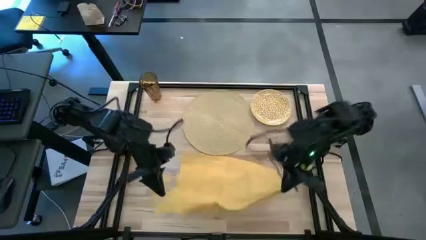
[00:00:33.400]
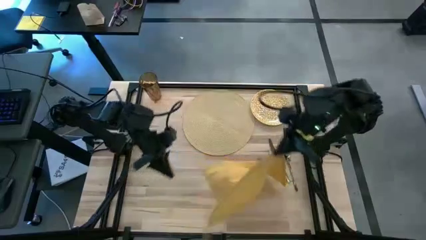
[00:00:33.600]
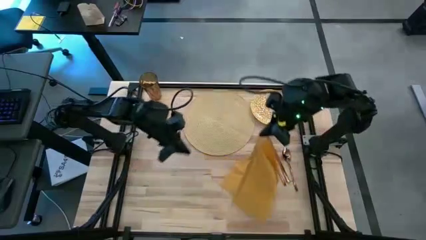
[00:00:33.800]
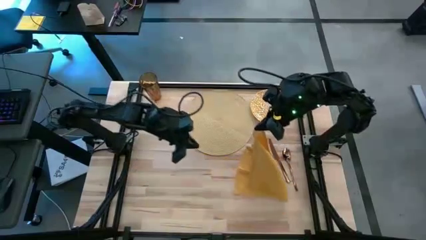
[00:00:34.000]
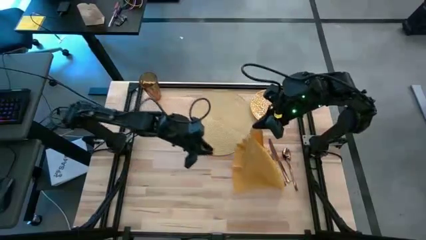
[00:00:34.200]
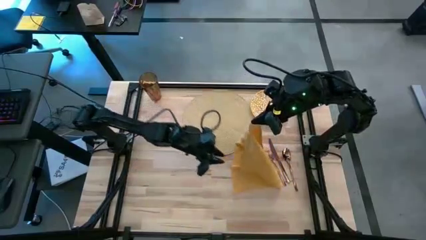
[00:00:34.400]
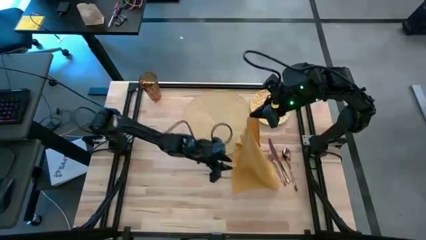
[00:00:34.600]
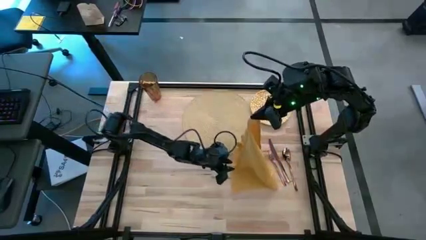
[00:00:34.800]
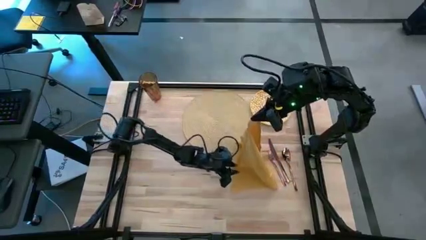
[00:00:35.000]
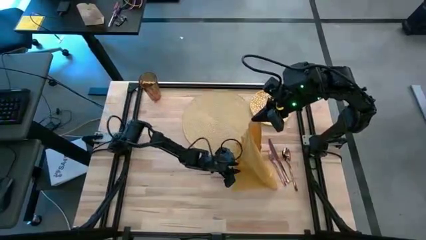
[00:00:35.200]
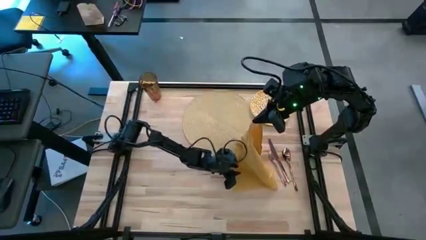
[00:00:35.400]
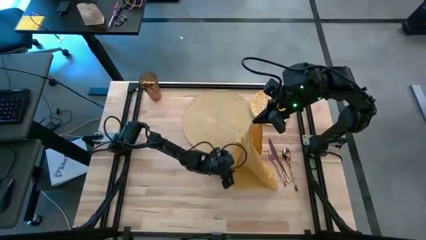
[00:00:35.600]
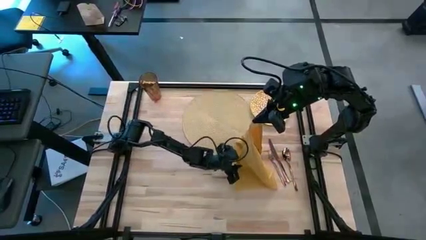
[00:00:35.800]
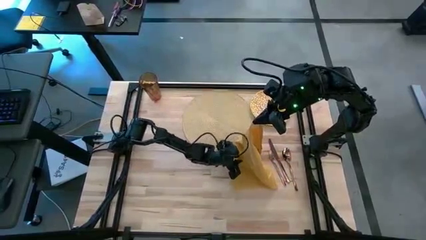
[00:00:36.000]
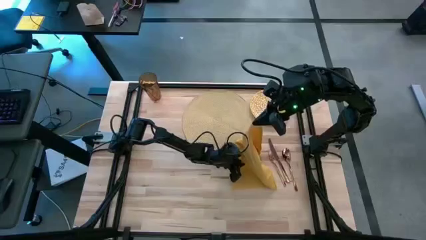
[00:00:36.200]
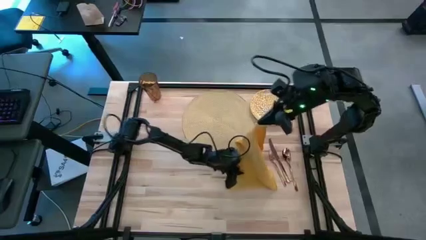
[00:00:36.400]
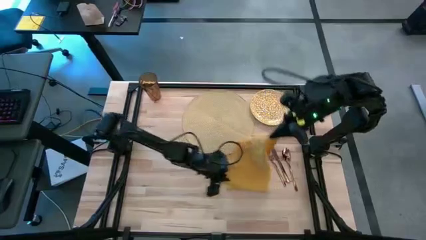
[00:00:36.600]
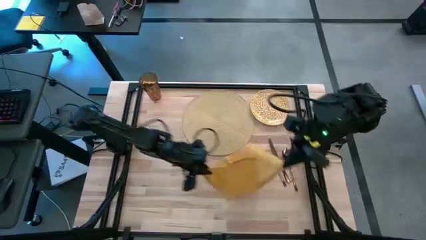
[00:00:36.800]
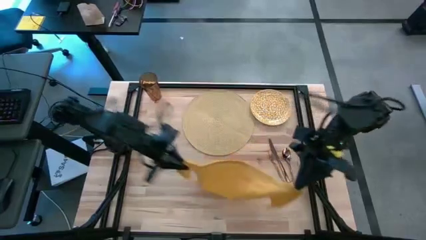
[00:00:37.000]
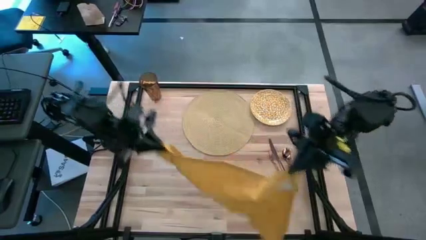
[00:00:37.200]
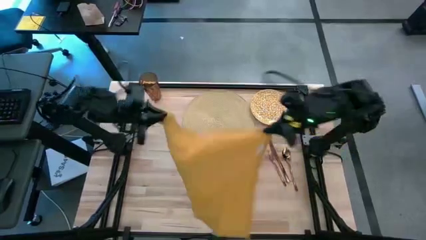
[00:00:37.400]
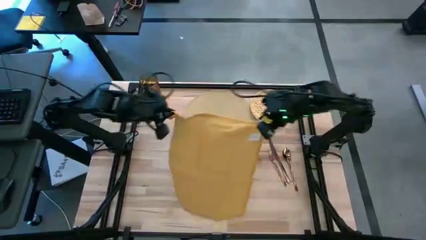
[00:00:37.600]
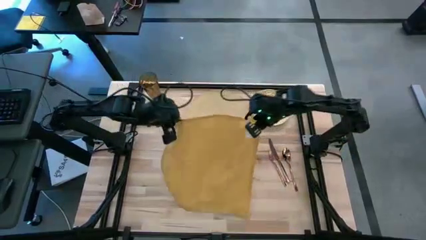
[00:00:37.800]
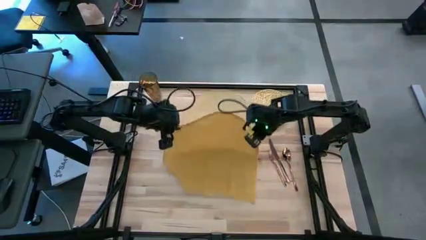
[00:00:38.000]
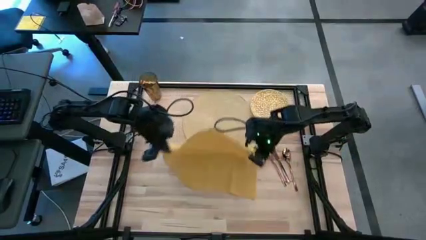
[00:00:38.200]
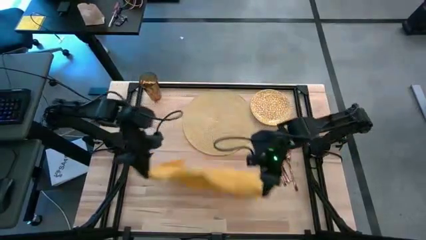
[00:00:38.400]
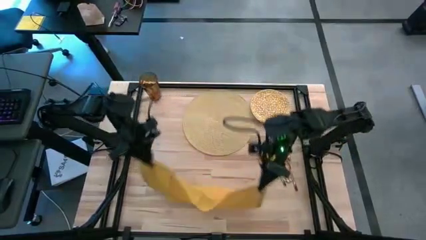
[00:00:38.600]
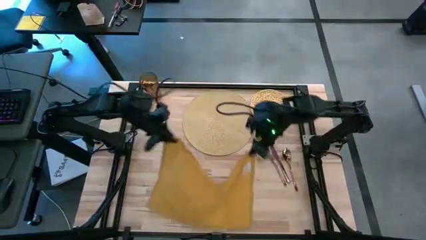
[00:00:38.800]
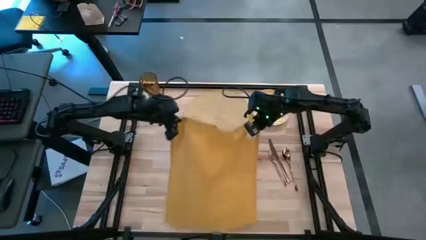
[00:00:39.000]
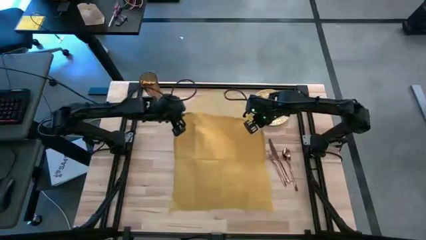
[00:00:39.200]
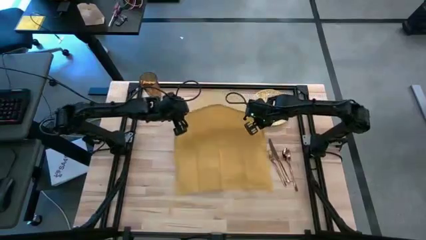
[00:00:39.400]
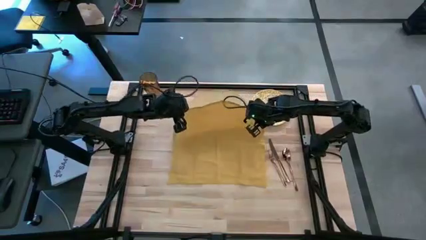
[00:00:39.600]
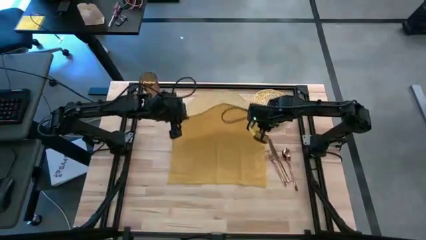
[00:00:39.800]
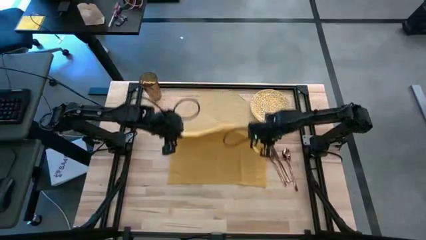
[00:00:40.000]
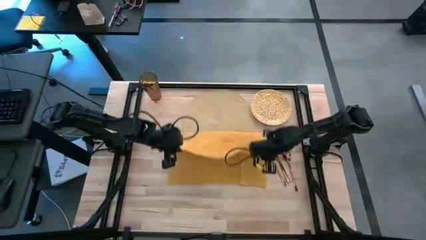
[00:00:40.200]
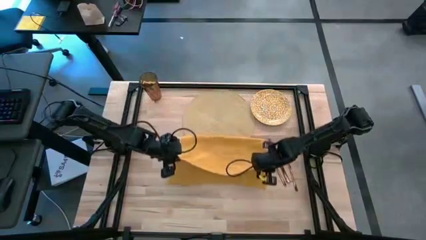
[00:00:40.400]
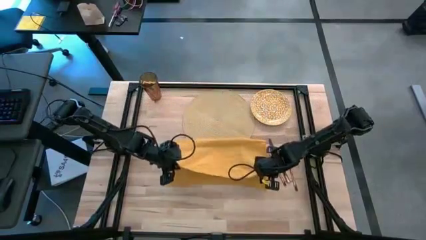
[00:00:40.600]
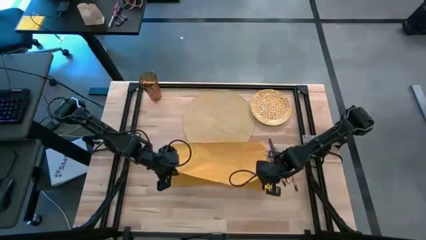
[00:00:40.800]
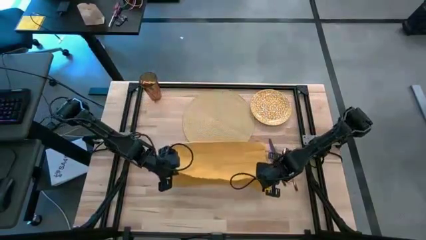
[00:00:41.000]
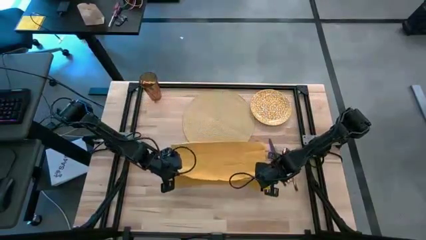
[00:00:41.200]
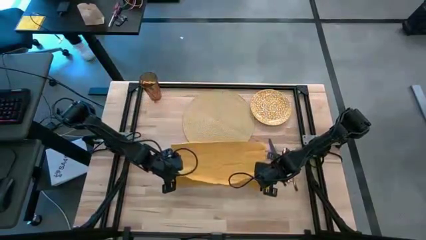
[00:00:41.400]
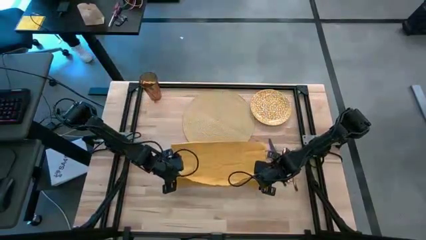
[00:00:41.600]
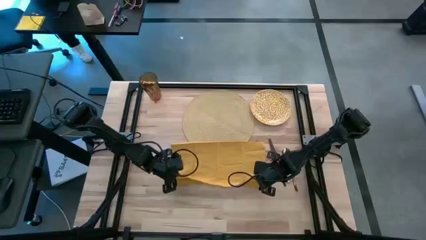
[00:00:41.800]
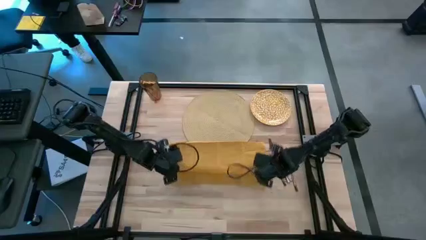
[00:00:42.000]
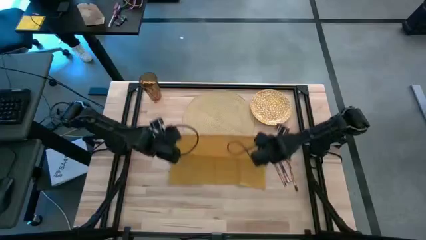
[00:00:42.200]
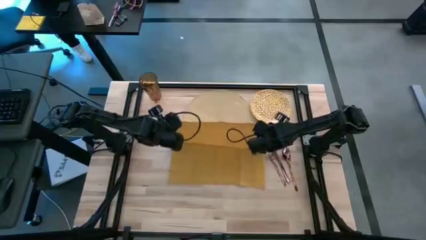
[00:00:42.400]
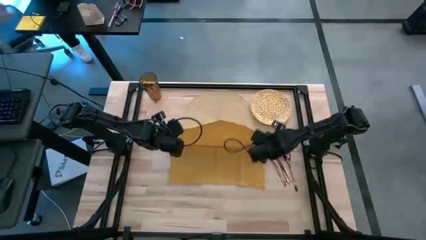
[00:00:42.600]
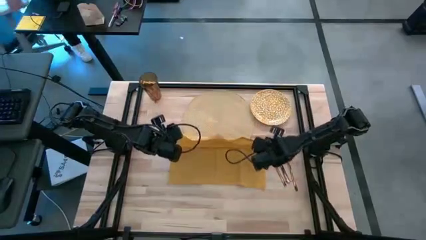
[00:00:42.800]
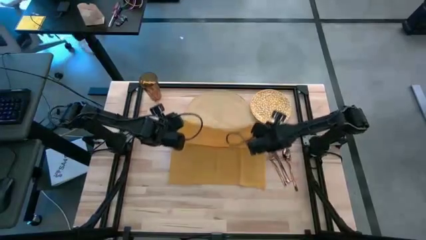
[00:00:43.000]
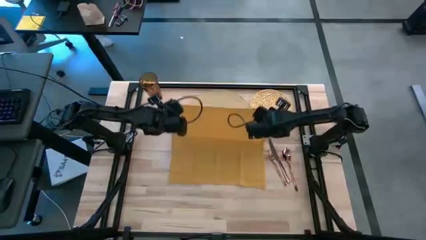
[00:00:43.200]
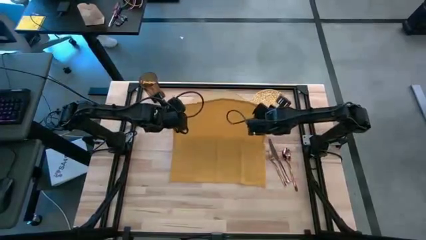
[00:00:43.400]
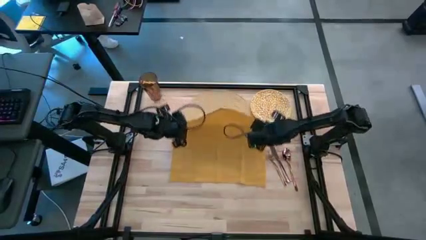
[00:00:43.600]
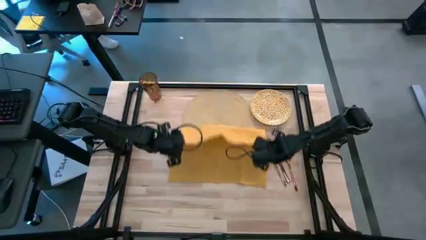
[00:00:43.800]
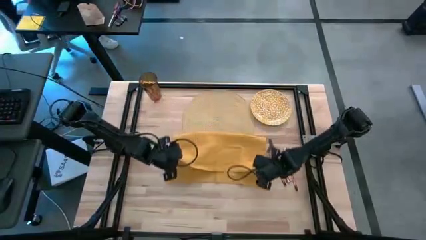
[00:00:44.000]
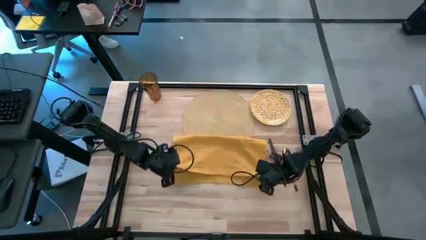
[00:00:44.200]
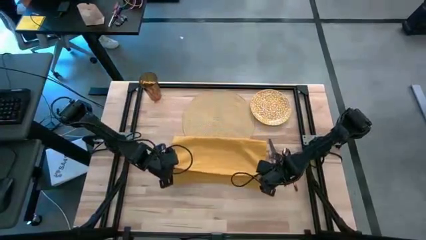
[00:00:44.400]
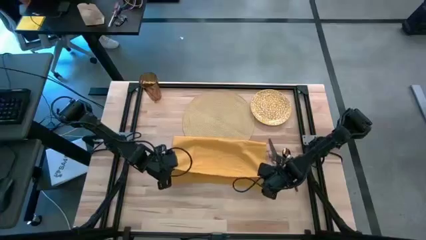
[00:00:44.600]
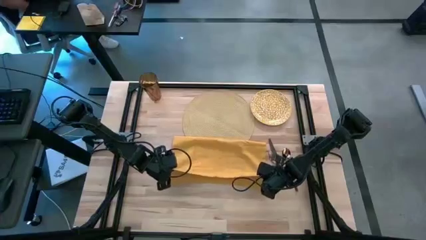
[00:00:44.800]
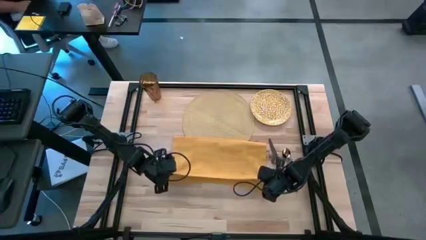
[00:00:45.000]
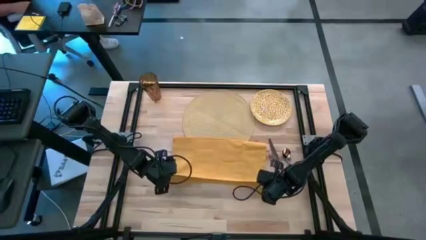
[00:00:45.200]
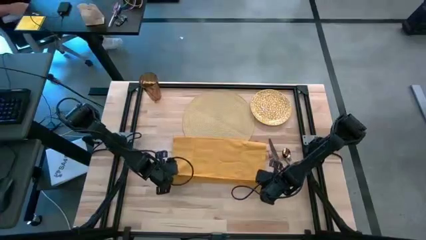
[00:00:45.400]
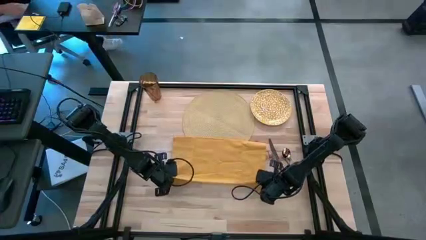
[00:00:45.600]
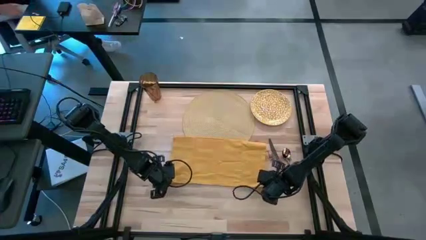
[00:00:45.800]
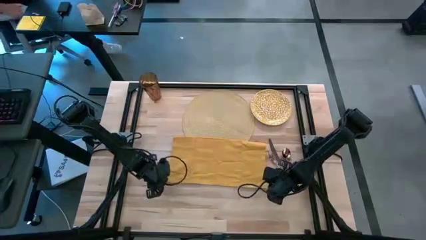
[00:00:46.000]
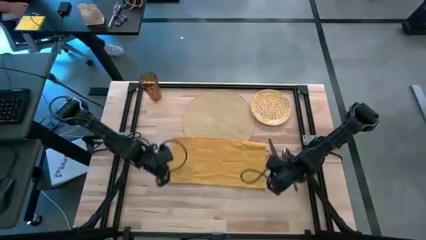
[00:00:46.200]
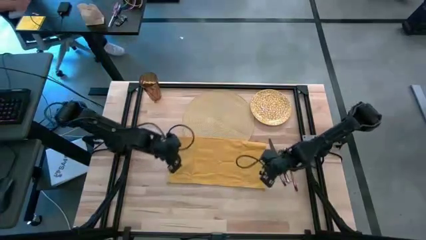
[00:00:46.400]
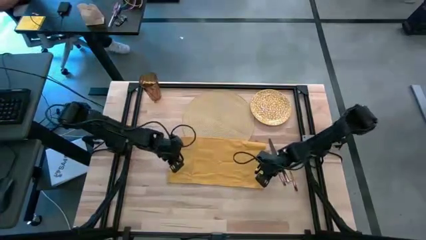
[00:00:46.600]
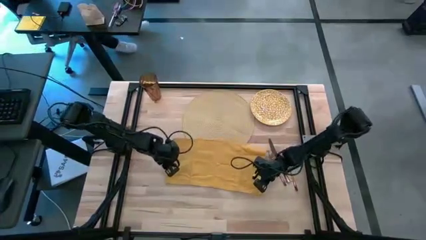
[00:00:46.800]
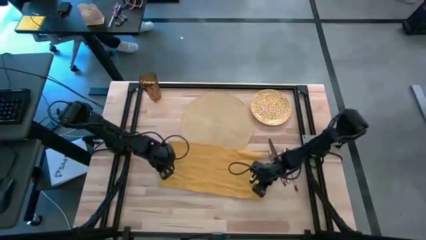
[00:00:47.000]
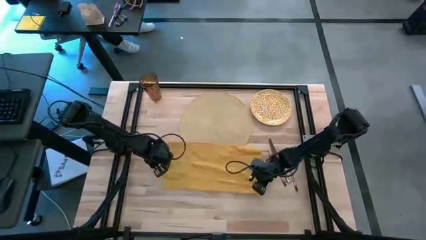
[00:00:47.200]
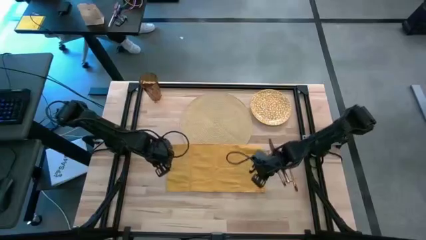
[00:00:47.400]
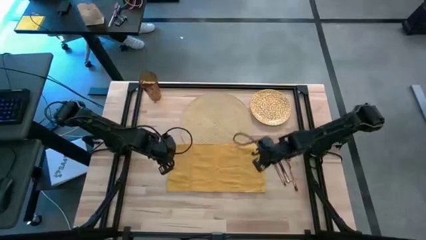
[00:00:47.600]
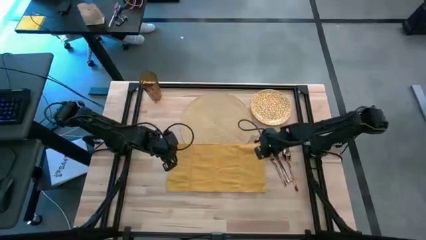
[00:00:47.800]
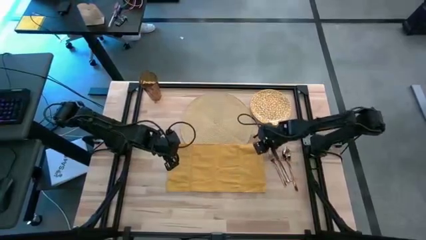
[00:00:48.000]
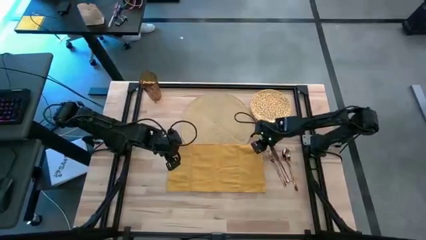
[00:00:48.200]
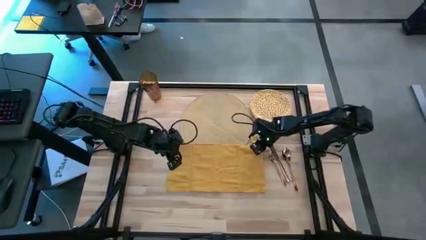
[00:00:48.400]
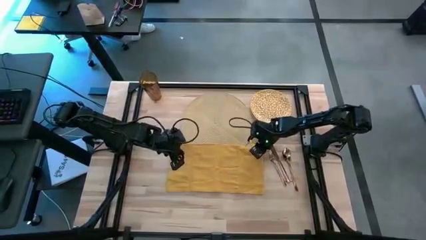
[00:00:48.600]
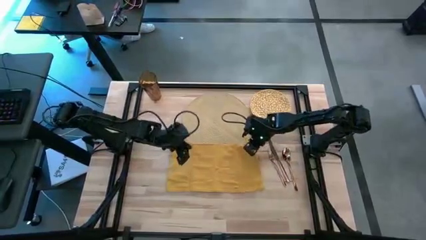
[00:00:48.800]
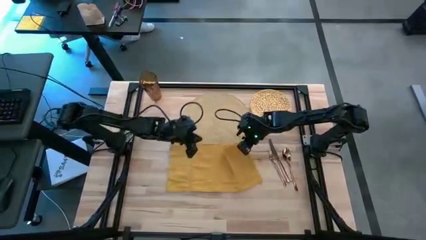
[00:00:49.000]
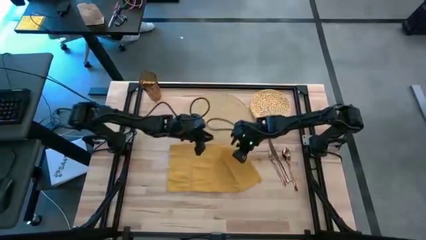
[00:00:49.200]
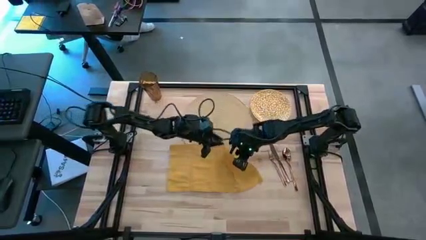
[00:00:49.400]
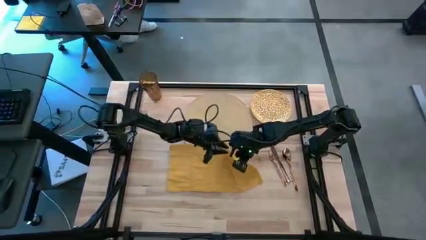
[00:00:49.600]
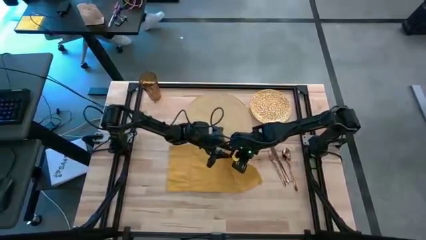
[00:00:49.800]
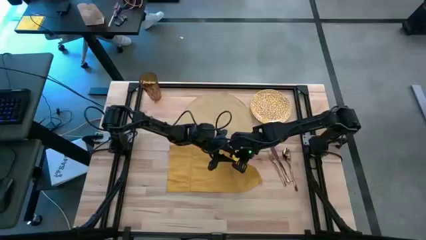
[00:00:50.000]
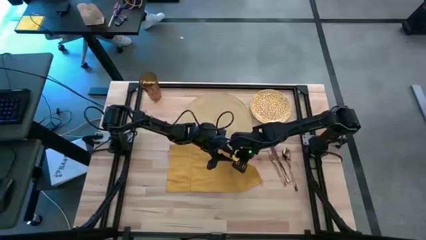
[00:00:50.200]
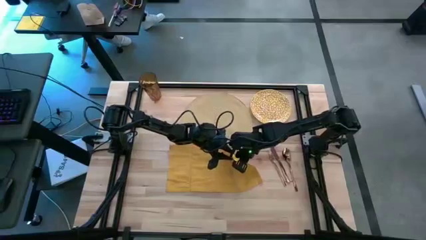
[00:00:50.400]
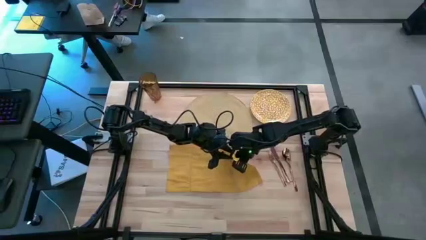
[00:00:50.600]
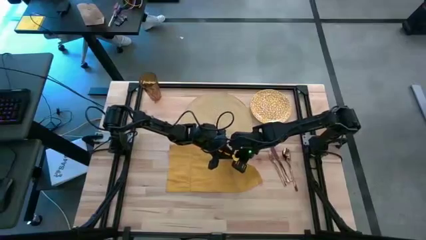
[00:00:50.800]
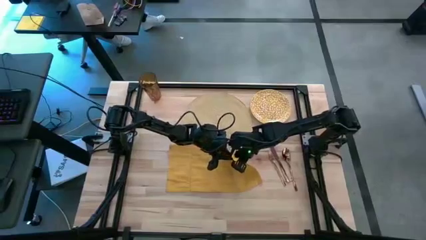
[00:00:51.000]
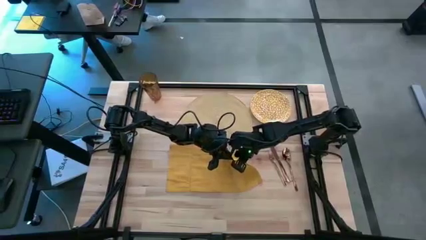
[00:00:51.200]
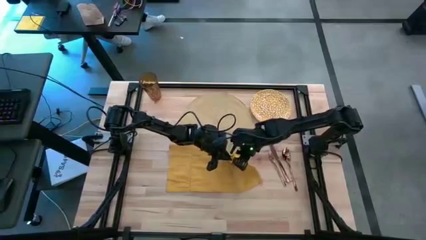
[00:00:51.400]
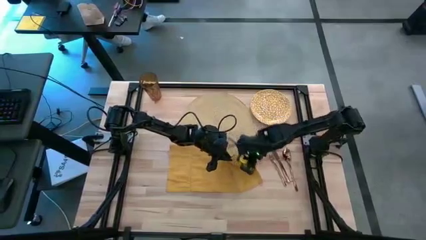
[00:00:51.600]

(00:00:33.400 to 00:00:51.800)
Task: Set table place
Fold the yellow table napkin
